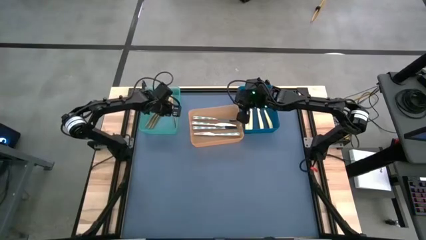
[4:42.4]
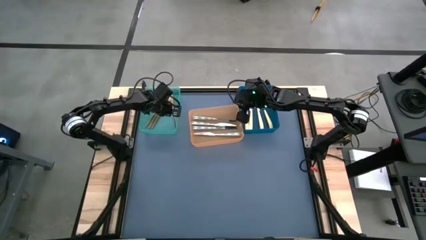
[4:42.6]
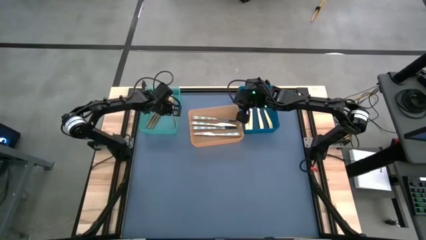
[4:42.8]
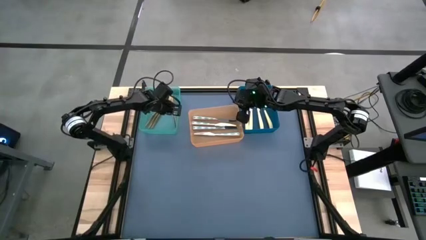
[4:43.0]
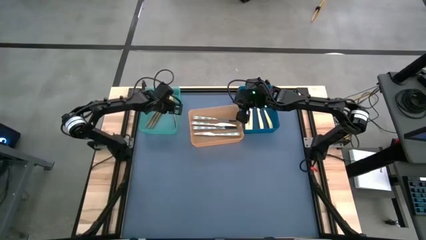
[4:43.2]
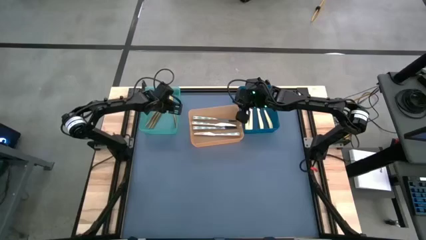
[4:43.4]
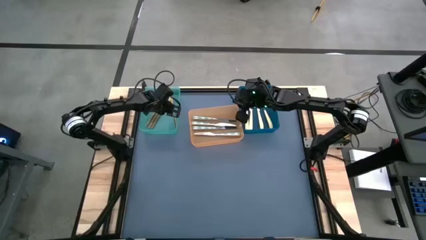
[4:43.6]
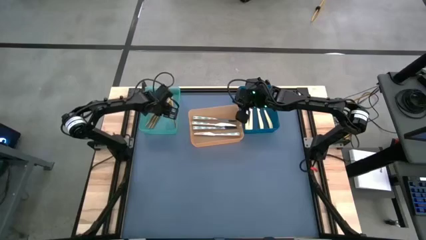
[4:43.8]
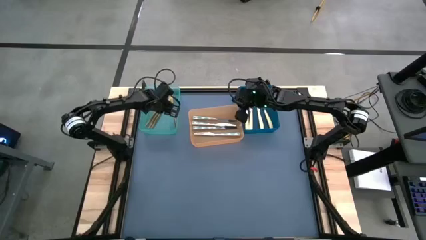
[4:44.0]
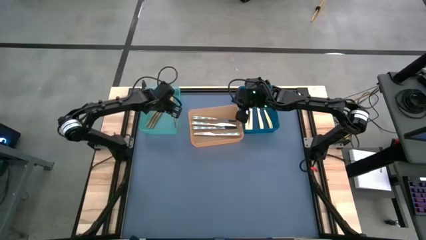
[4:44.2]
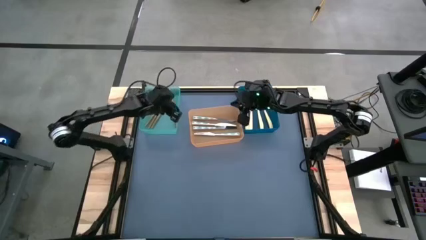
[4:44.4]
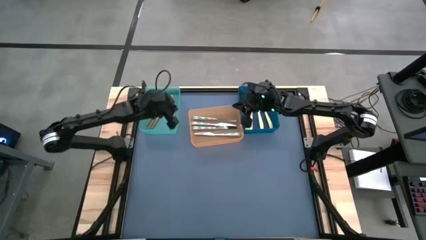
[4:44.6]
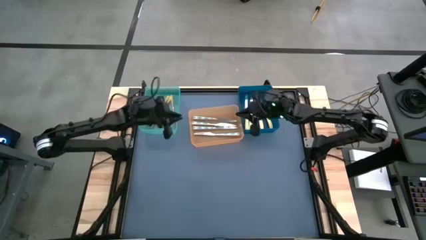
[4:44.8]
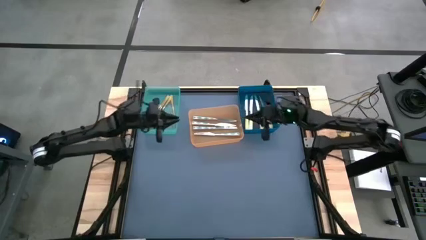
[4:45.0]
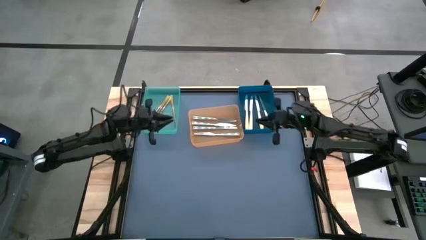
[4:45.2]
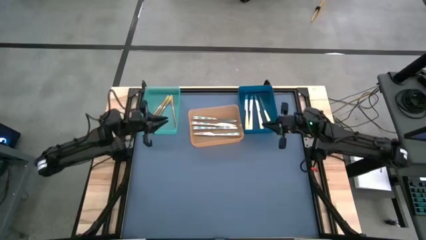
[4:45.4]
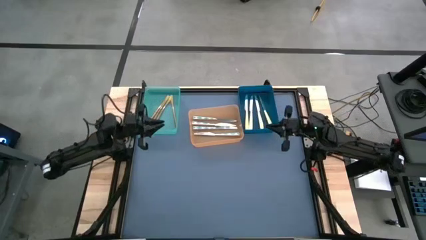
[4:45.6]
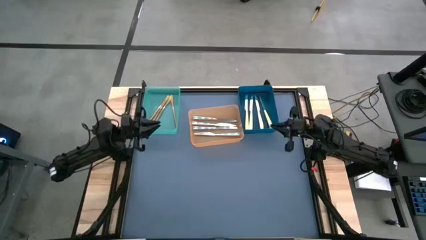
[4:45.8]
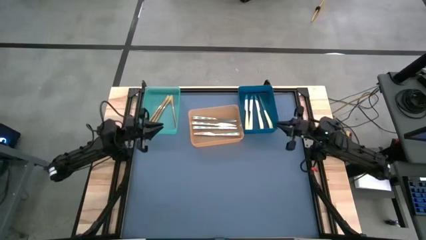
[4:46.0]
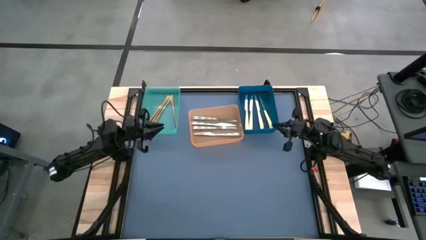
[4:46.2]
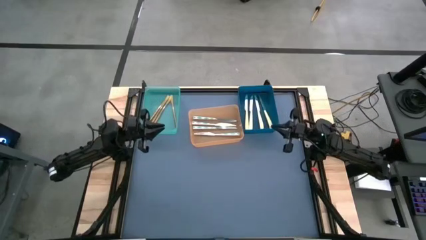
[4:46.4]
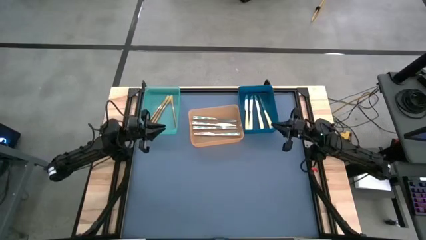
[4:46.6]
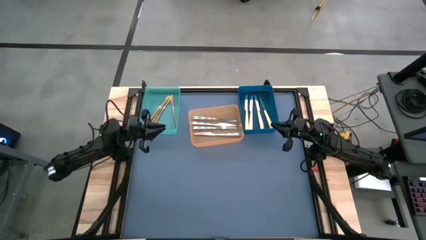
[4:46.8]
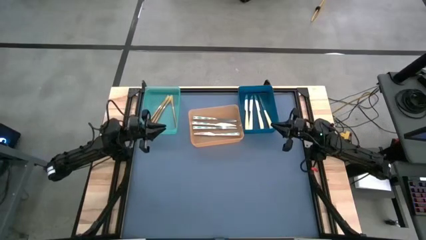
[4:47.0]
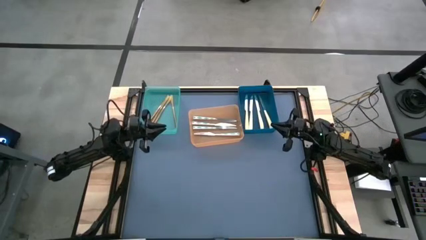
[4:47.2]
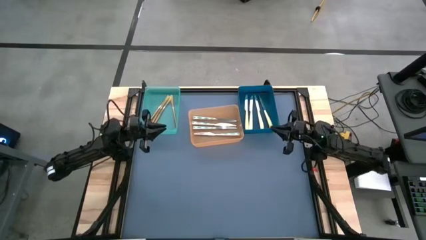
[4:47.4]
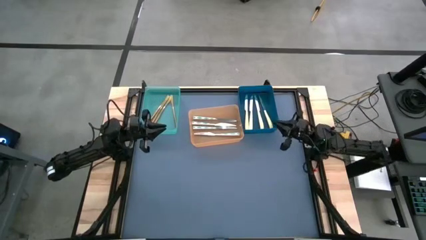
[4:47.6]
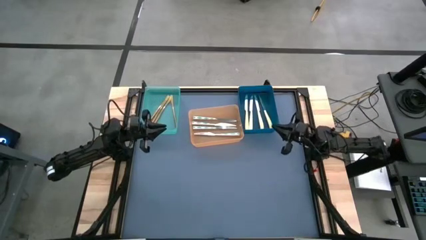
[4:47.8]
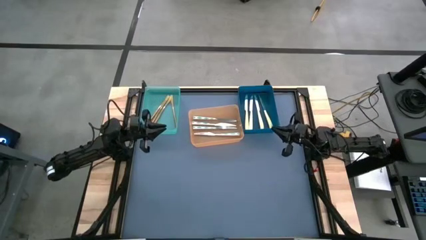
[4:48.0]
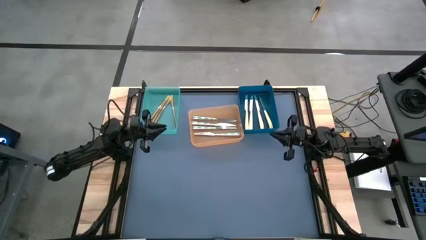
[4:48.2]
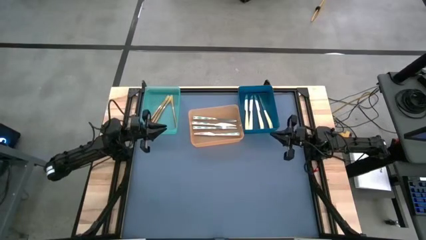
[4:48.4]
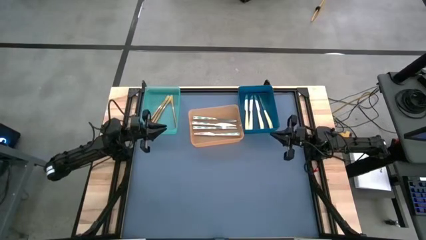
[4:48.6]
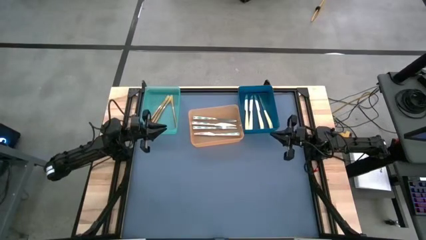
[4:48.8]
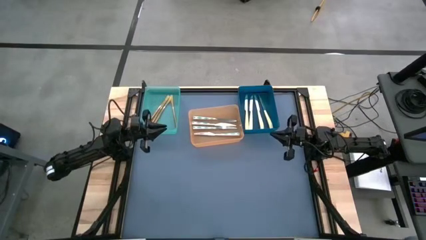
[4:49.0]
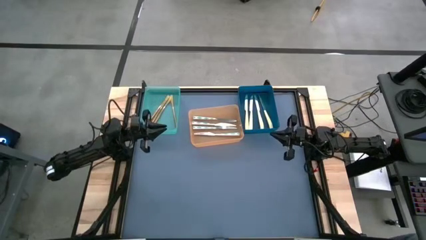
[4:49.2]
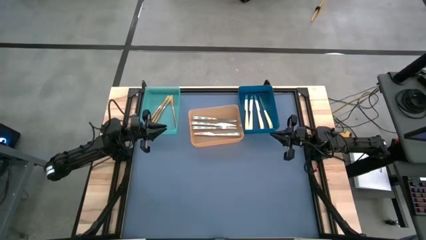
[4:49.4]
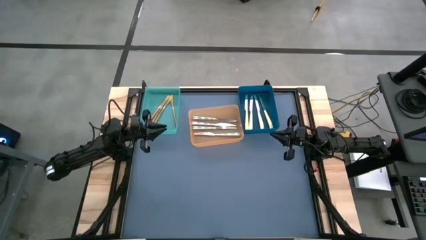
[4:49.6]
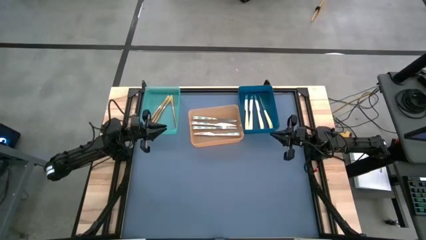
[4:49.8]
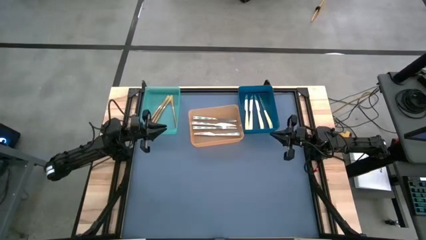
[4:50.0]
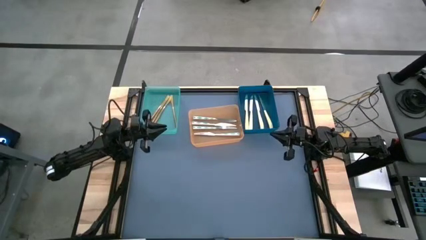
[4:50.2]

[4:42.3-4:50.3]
Task: Sort silverware by color (type)
Return to Home Position

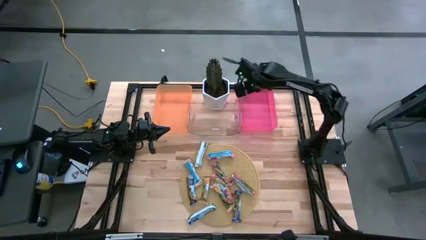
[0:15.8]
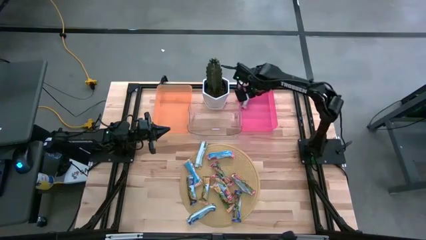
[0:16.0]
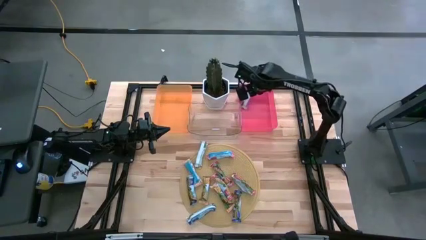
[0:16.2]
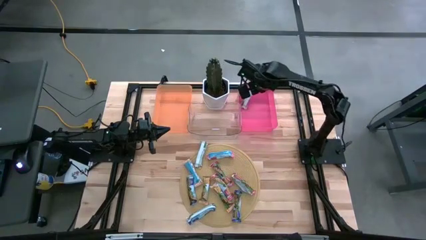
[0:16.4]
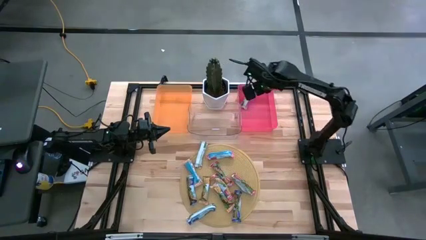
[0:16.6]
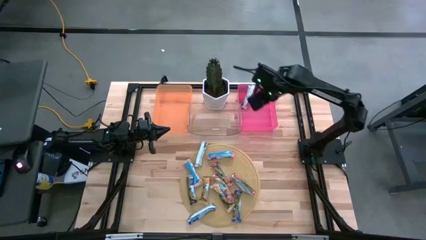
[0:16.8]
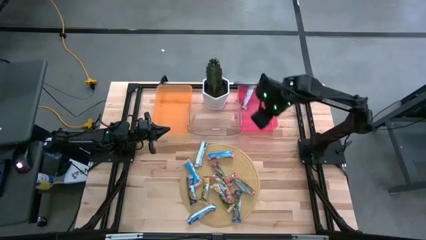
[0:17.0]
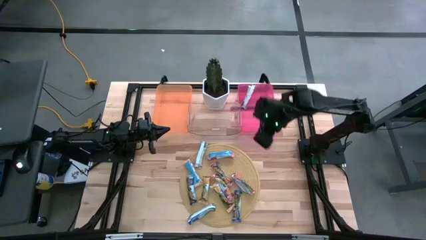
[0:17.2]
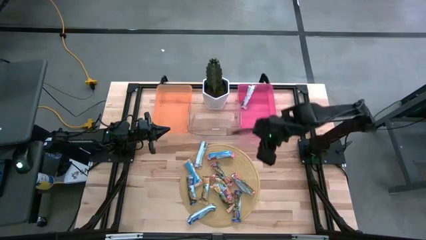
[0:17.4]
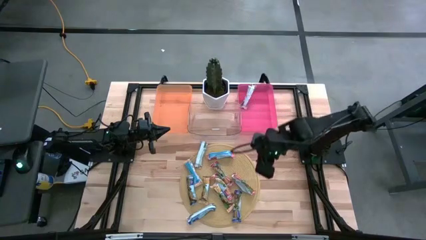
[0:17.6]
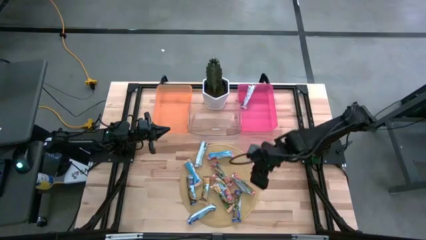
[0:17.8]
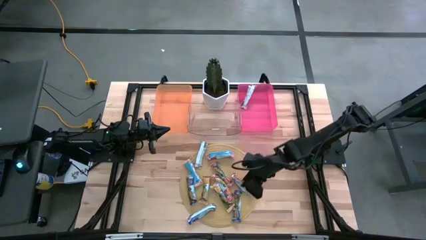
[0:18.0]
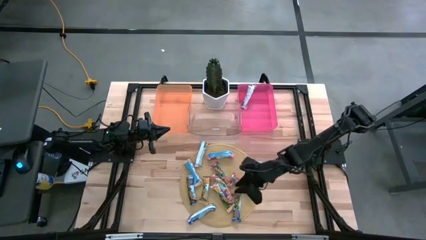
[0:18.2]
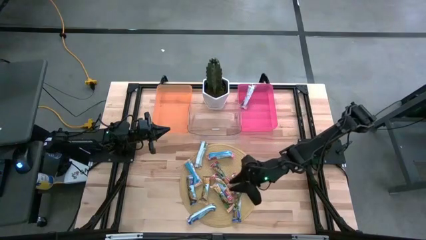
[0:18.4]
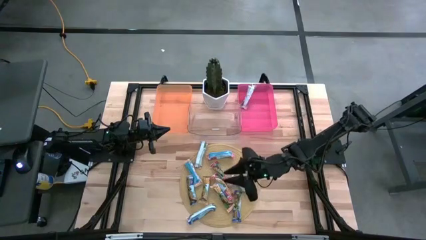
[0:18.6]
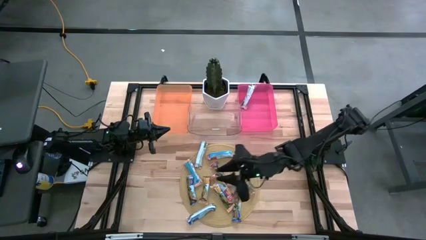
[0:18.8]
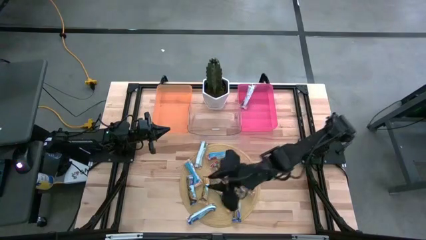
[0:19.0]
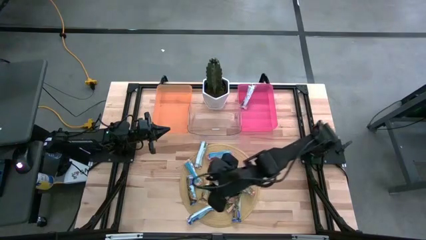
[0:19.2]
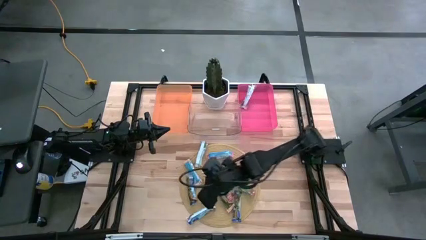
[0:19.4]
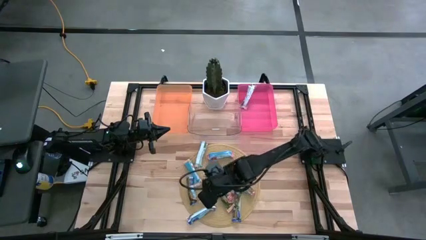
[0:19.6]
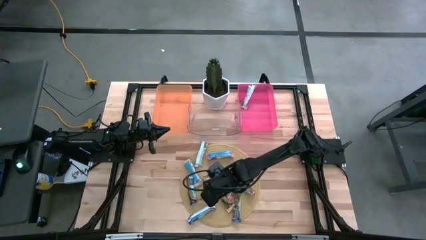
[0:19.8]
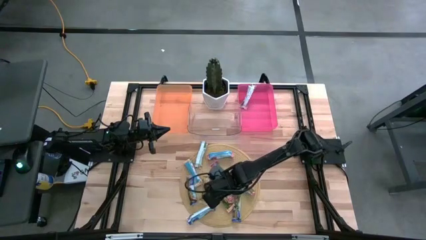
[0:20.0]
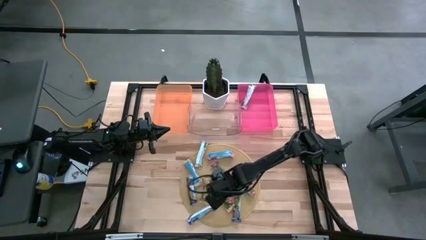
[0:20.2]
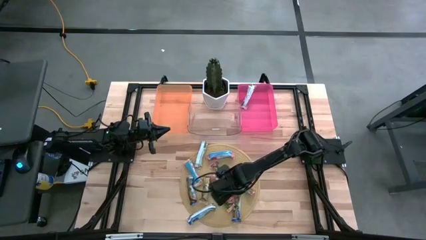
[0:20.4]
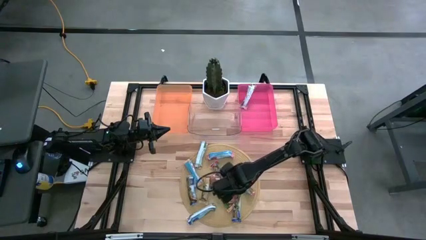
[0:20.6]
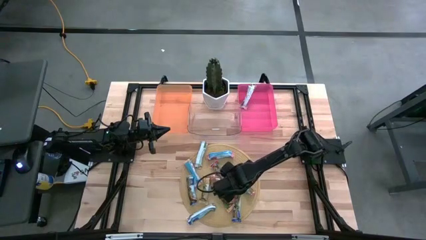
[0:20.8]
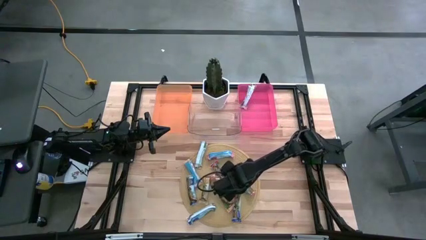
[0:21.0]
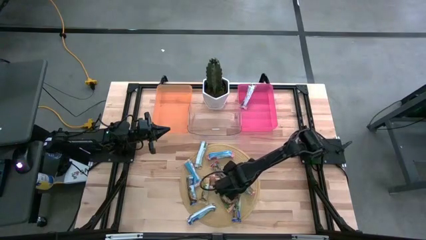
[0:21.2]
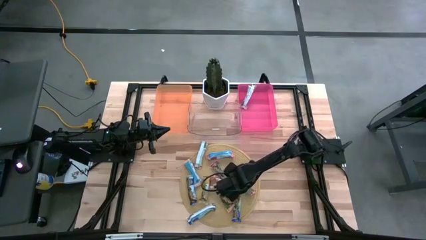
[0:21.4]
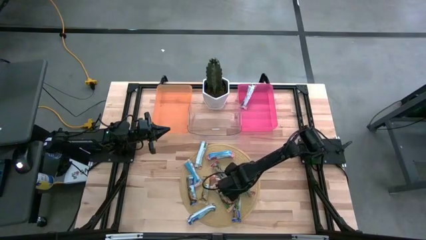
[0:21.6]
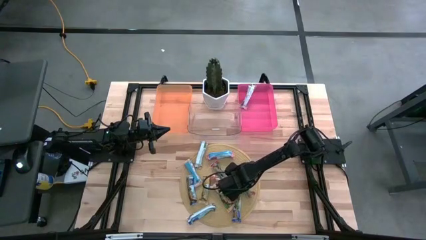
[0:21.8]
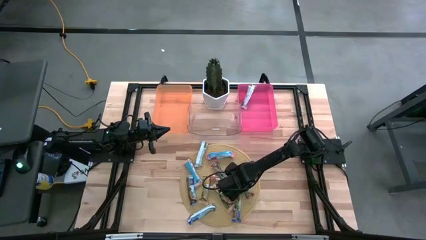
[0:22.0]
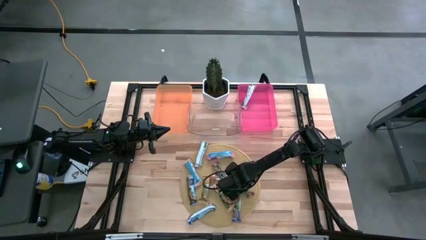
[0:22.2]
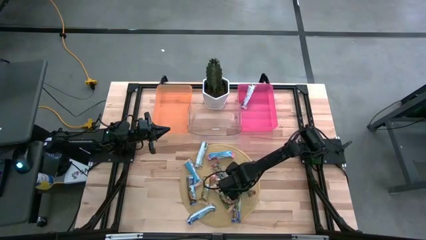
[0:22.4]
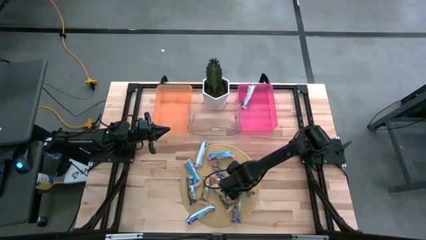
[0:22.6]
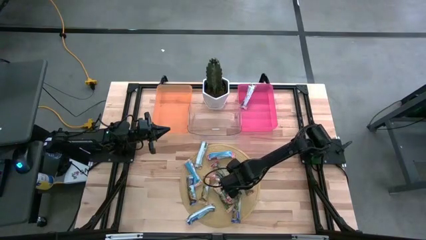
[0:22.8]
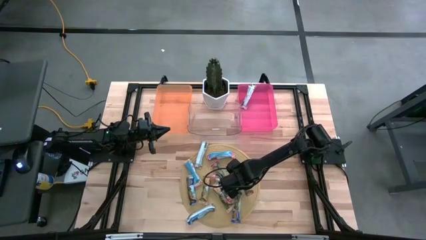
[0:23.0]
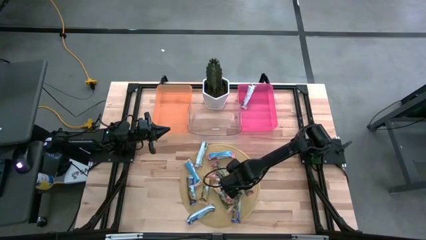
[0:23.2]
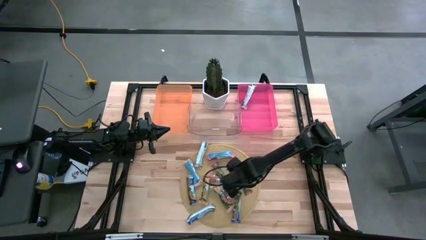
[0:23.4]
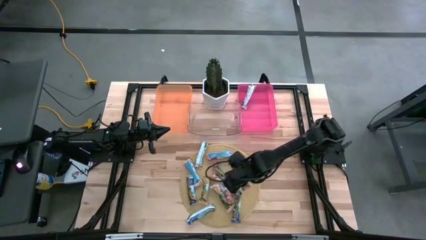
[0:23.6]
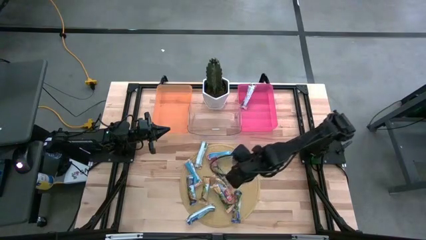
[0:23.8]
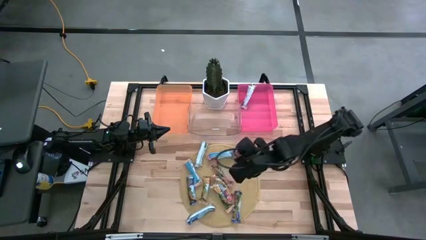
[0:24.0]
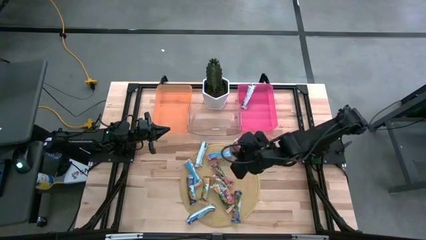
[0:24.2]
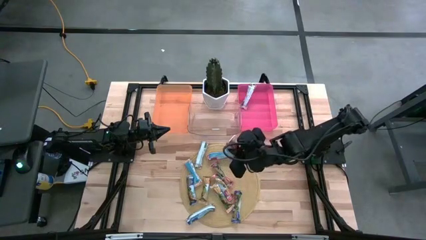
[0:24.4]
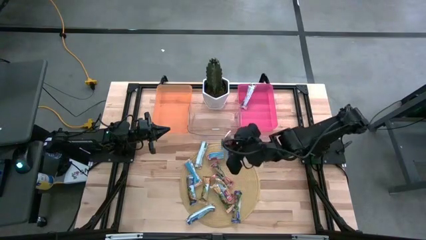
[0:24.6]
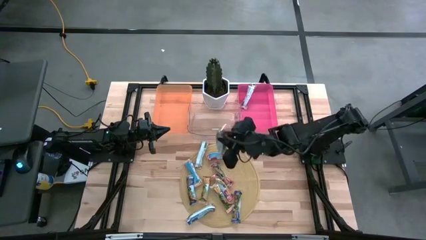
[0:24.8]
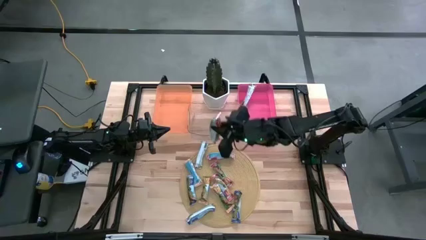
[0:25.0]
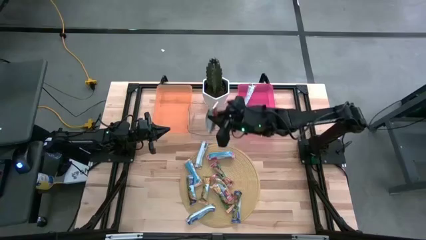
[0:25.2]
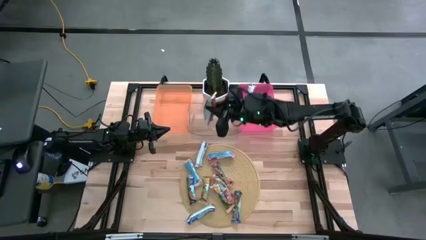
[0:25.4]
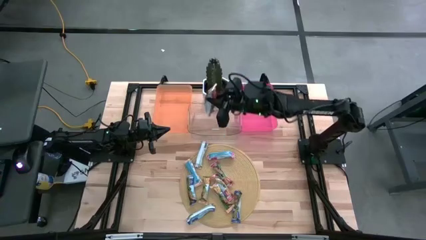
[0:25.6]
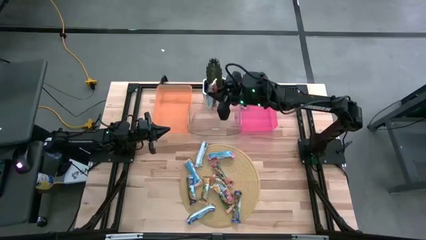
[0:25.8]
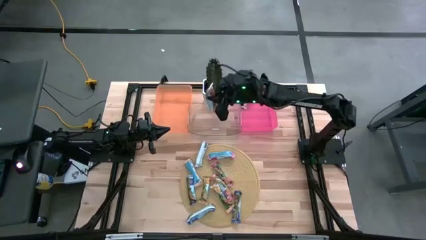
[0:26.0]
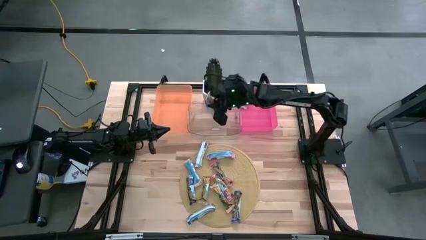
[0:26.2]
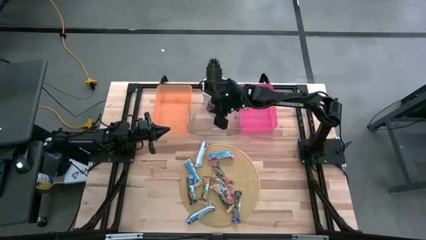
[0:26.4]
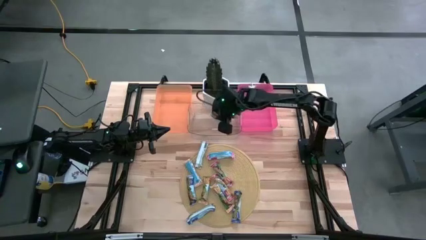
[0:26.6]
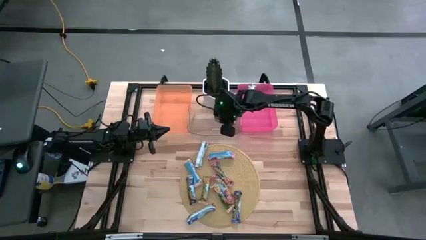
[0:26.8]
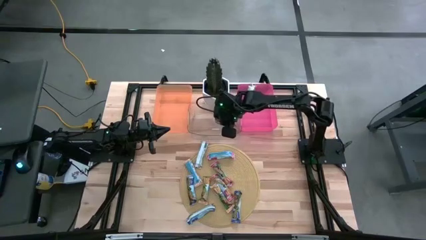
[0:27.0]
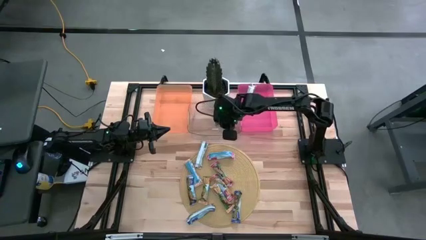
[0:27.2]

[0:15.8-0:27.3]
Task: Pick and place Granola Bars by type
Put the red granola bar into the transparent bin
